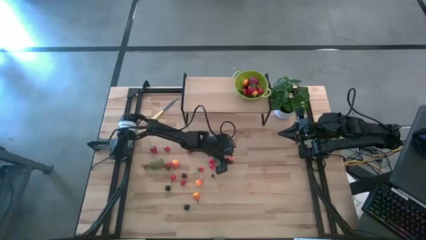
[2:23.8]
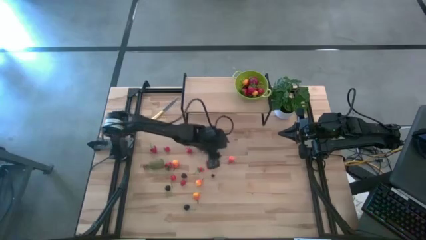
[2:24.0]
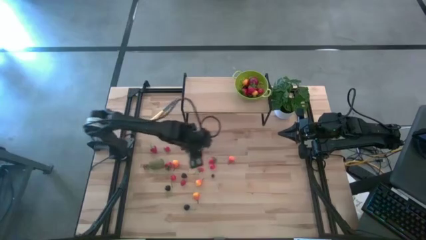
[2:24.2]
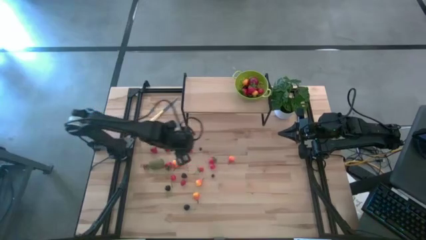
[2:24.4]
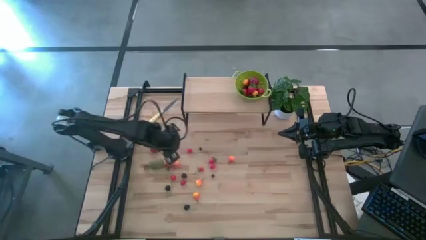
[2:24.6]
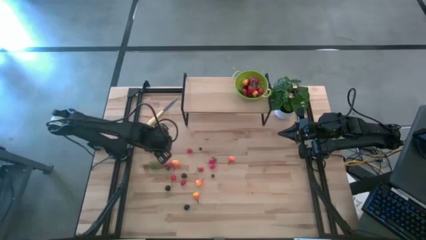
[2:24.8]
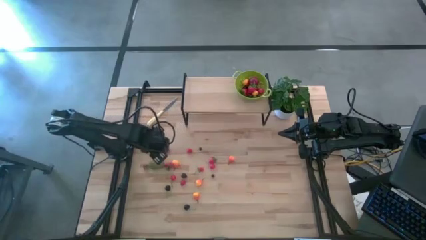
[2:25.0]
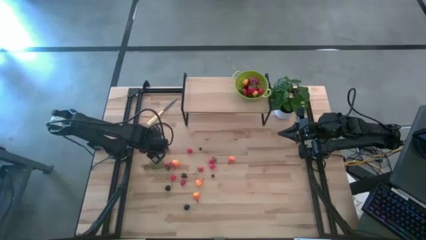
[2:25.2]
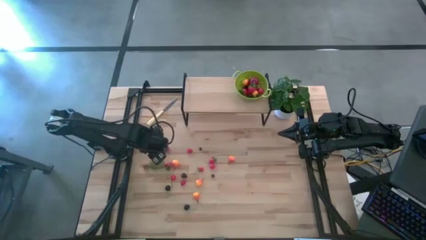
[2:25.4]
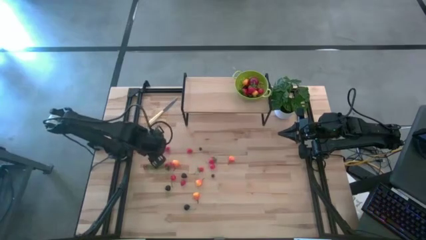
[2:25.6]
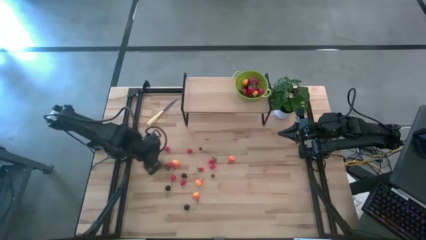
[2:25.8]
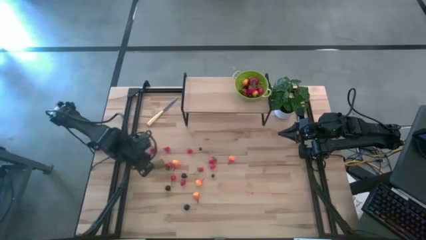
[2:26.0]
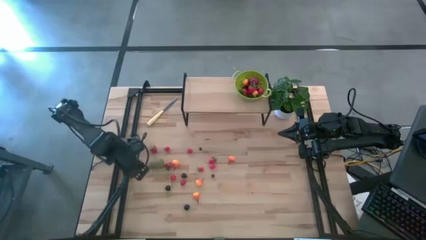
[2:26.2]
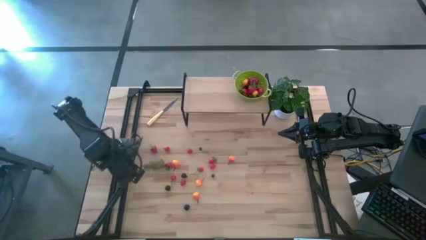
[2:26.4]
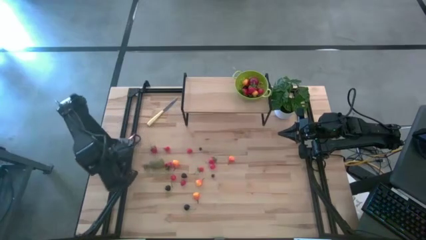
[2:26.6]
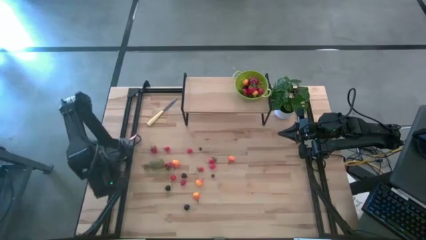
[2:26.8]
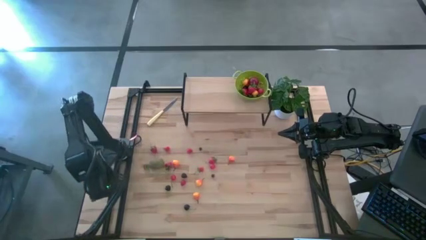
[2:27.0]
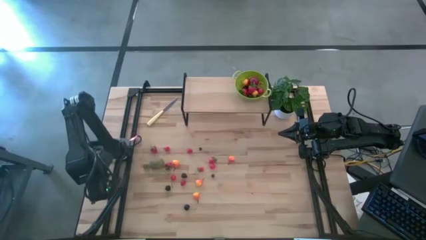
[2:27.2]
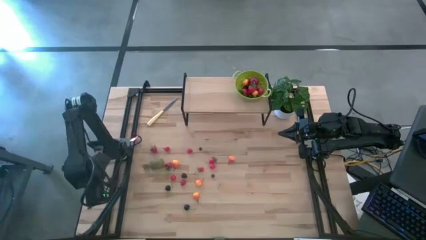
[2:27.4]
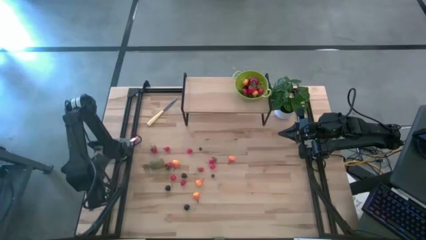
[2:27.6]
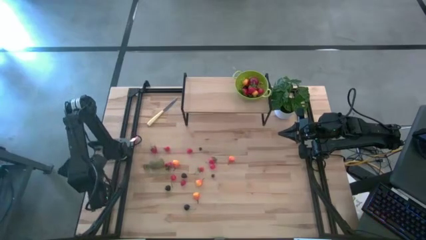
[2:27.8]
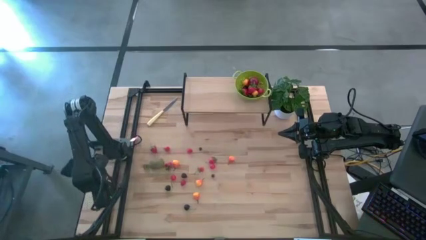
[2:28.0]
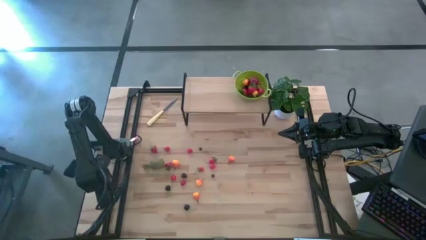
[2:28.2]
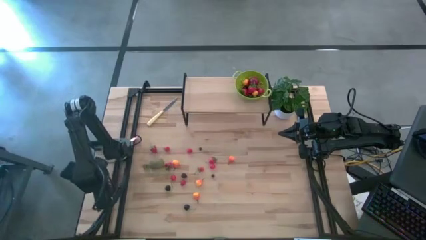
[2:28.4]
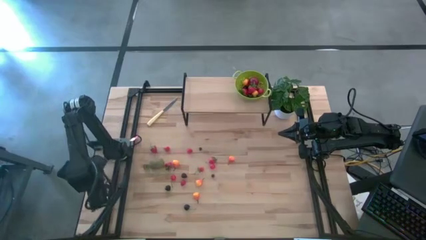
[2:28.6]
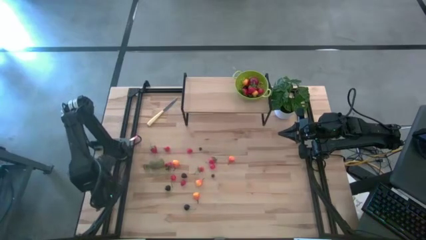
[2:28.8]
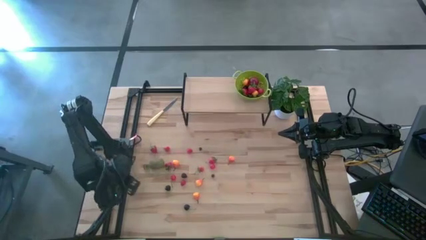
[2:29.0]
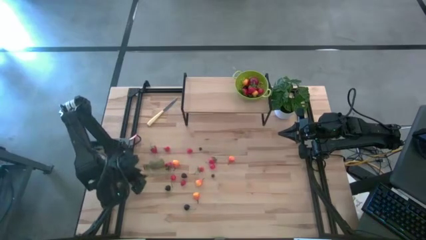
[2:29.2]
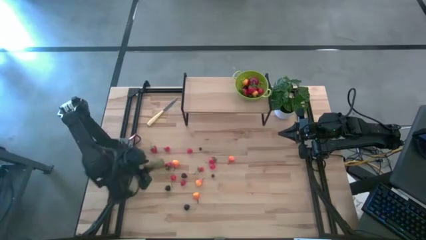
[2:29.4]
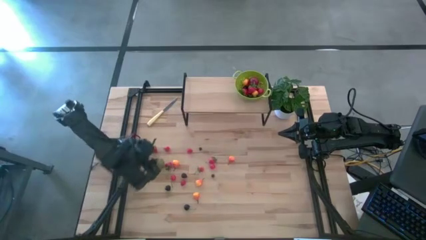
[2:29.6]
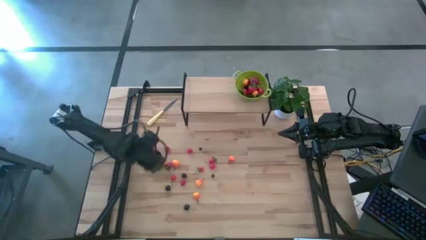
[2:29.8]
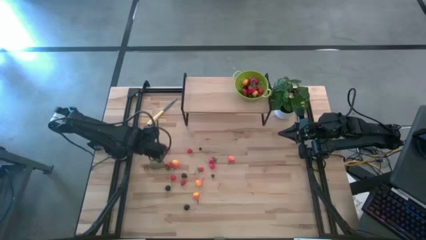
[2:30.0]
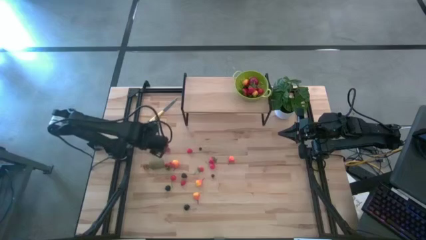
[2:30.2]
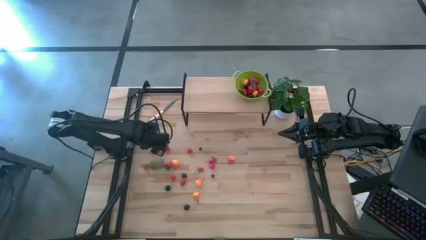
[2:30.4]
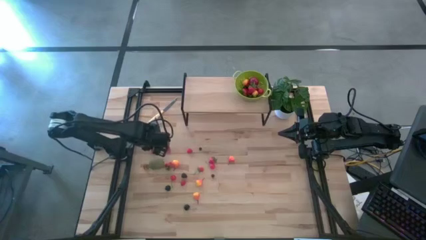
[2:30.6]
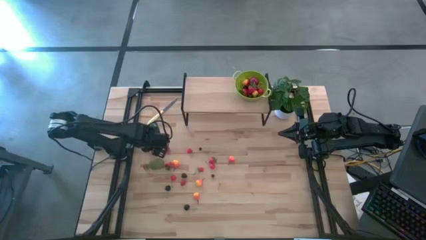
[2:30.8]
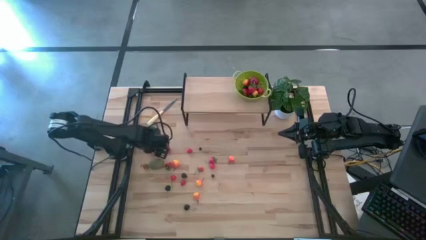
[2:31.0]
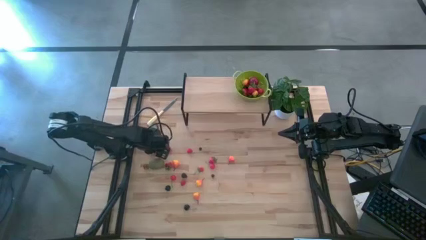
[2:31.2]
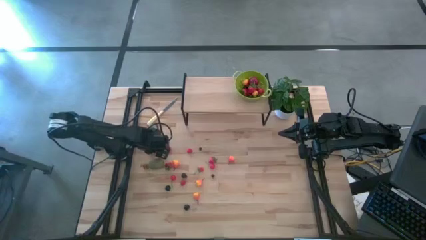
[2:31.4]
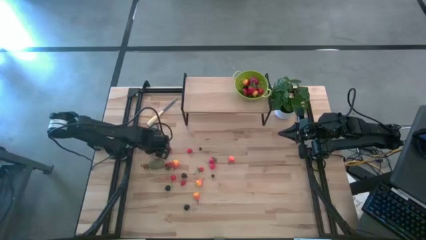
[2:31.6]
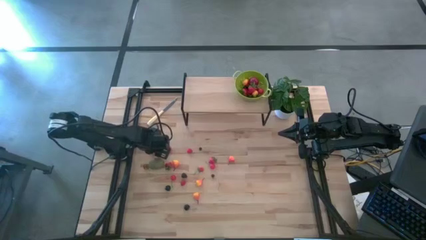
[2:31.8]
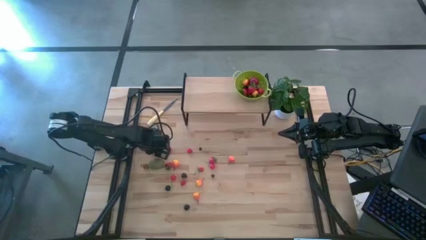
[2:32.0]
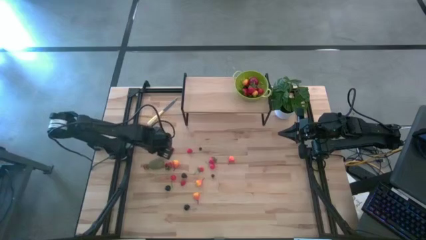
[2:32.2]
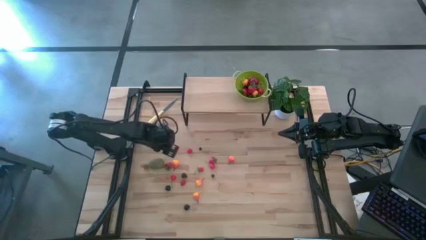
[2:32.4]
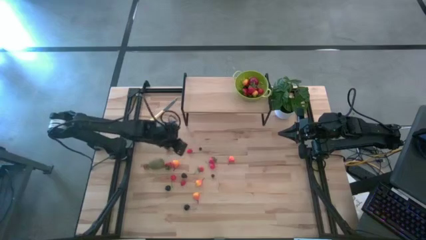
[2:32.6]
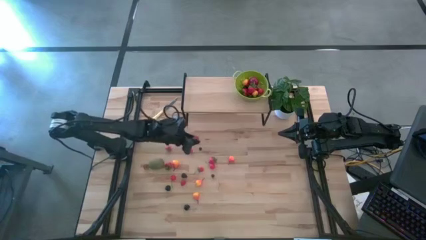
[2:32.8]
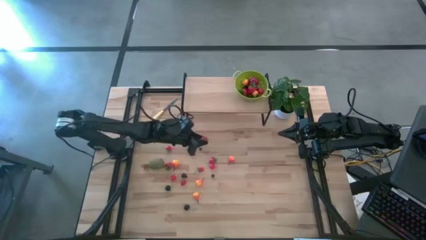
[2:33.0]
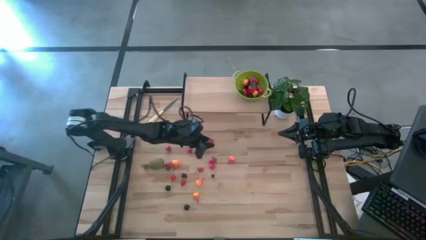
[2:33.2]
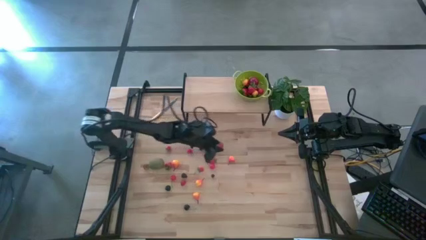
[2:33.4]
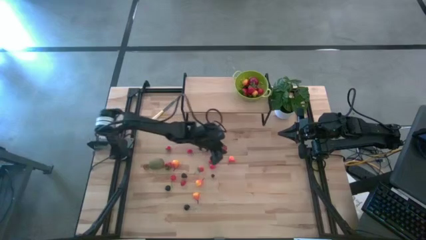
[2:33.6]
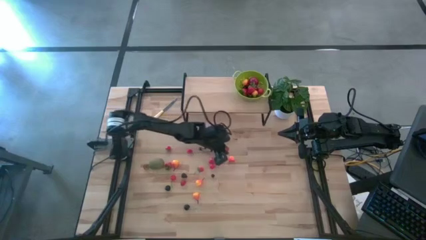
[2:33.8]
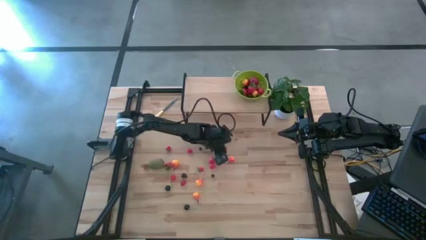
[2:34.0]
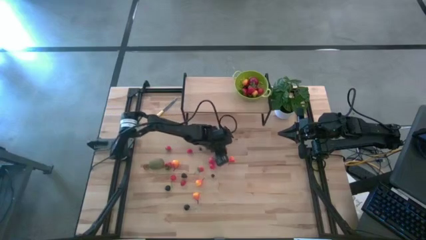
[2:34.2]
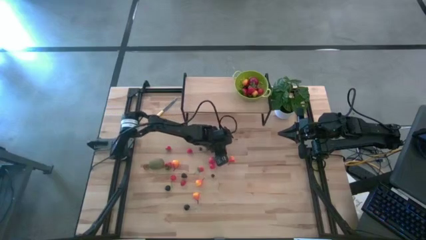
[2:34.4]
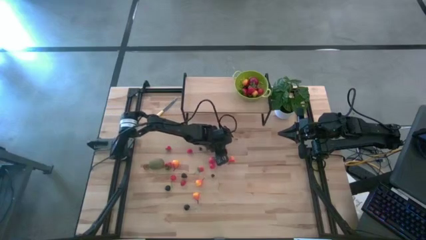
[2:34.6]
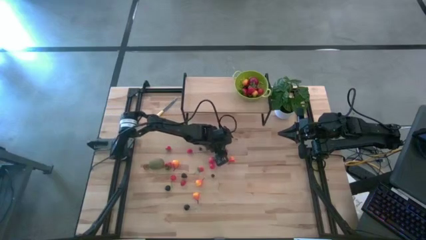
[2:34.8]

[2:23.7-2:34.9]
Task: Build produce basket
Move the strawberry to the center of the table

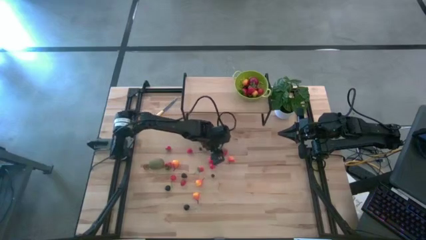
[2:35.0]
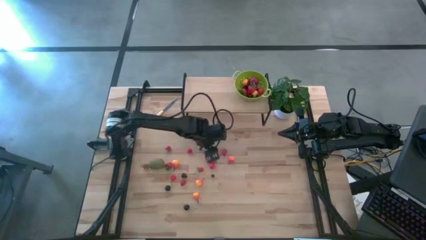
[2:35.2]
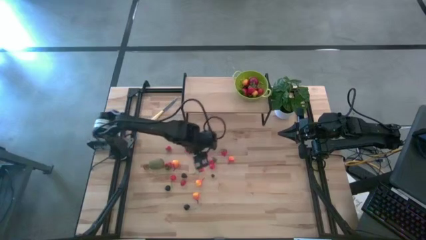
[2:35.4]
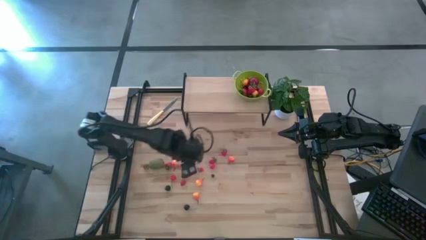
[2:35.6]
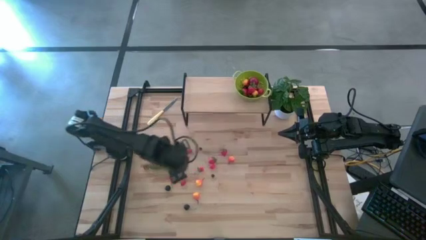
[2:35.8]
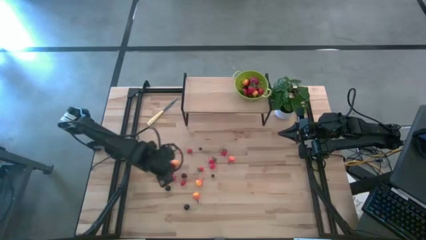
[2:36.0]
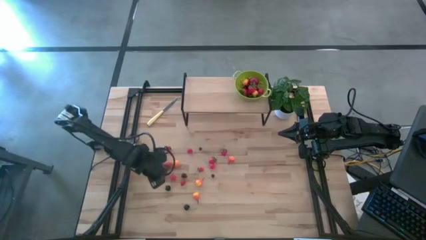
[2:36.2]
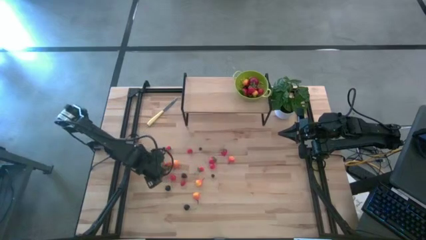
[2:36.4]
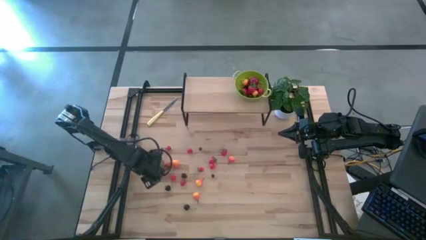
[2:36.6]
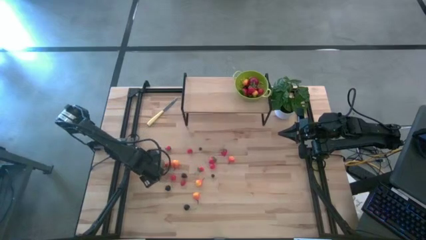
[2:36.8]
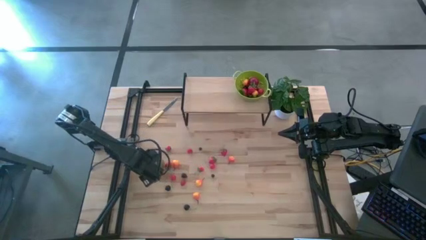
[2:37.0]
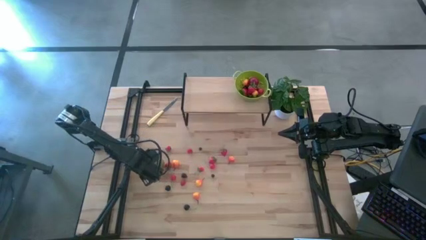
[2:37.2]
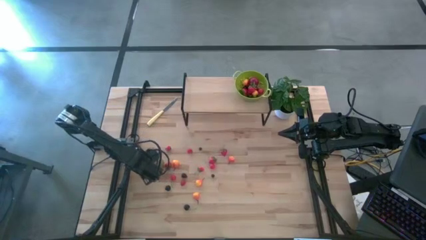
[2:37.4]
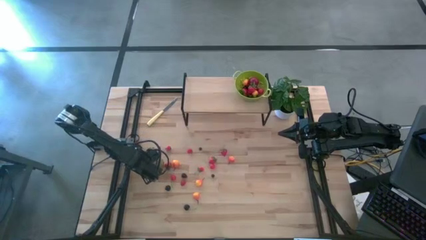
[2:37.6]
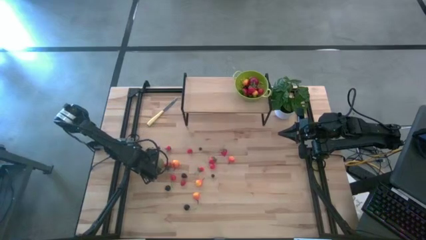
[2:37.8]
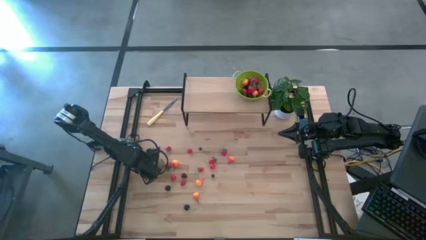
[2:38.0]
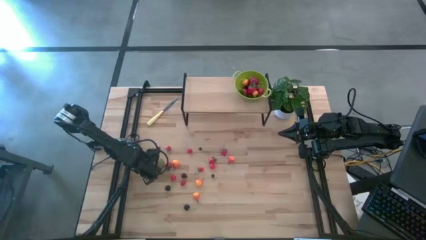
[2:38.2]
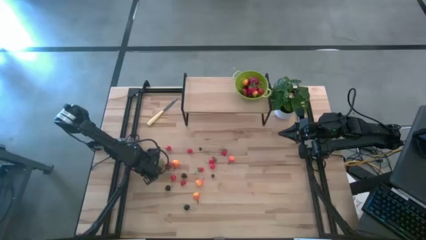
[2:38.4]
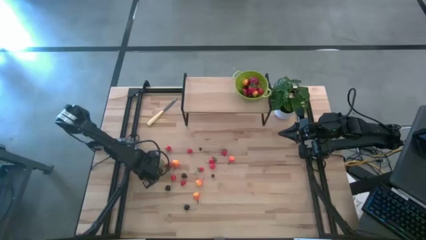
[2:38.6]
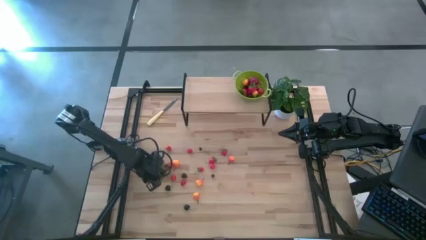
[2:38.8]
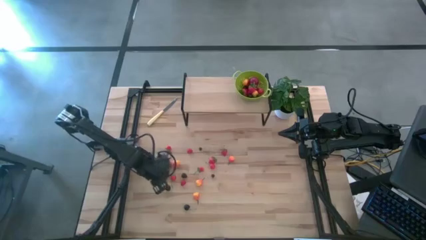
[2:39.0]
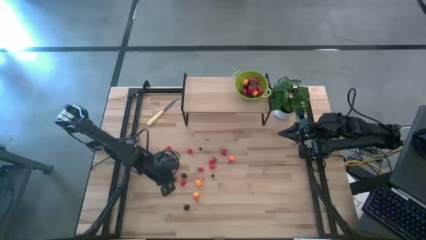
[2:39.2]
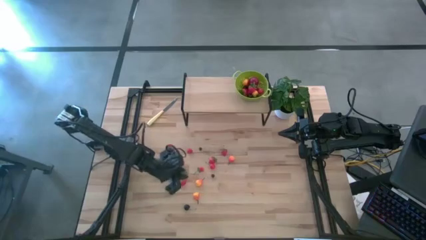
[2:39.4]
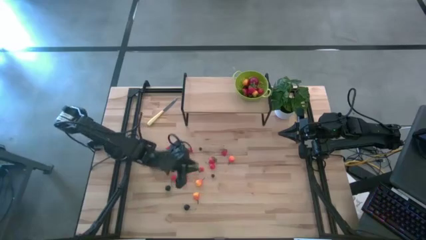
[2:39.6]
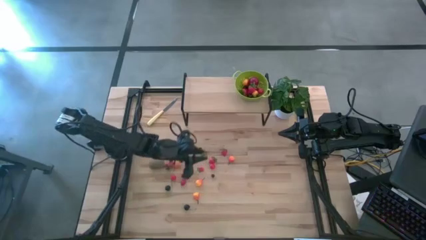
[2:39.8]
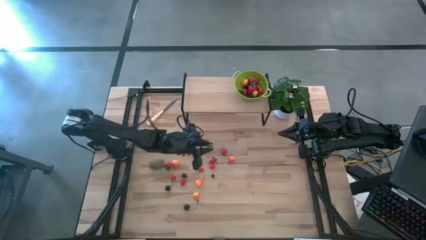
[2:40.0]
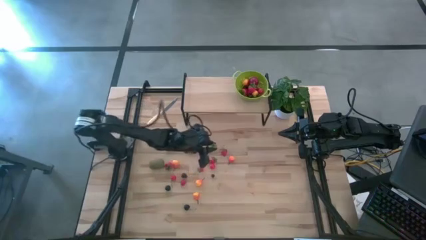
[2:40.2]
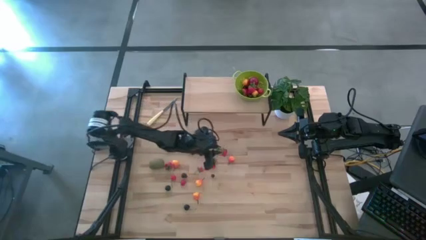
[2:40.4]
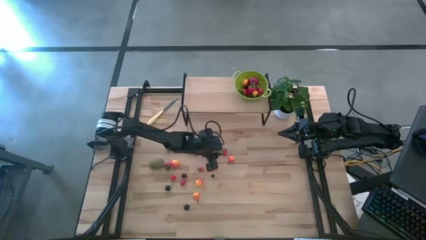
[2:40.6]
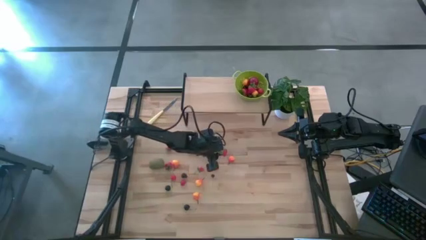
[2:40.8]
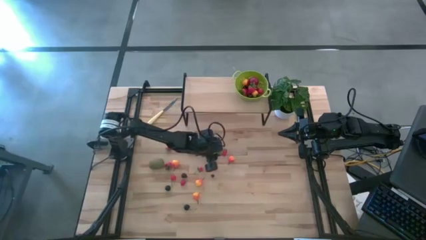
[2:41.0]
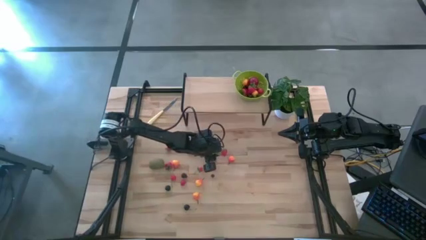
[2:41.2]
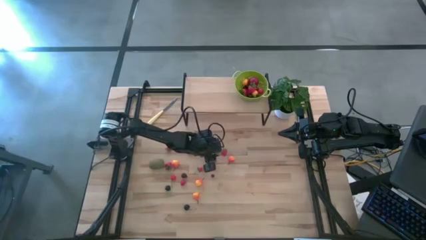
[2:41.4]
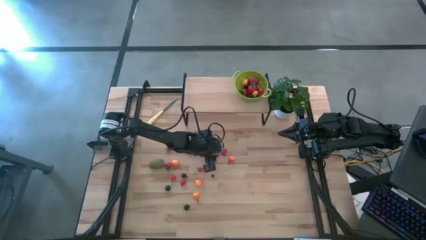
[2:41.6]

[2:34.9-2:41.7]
Move the strawberry to the center of the table
